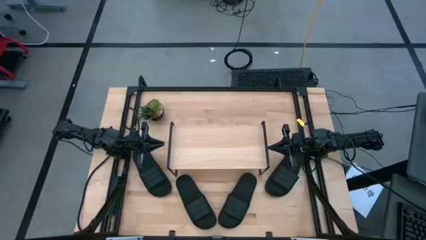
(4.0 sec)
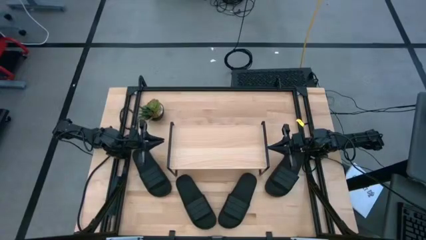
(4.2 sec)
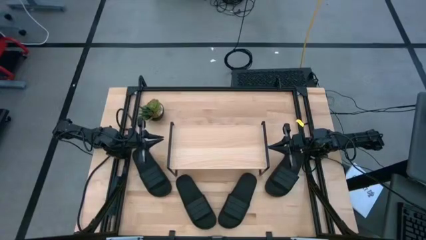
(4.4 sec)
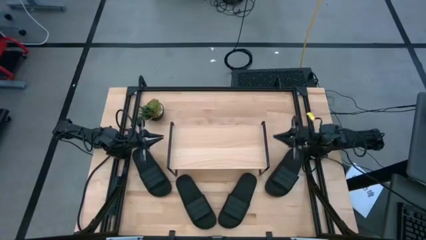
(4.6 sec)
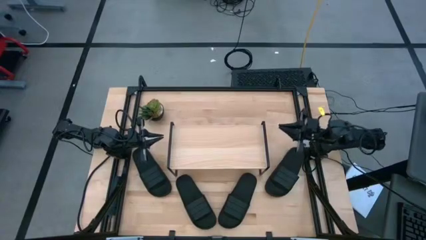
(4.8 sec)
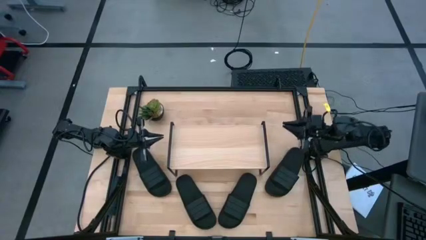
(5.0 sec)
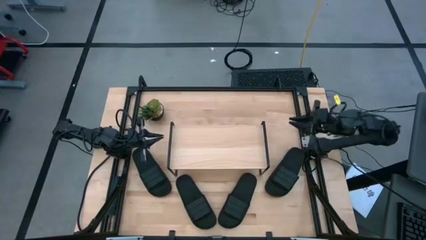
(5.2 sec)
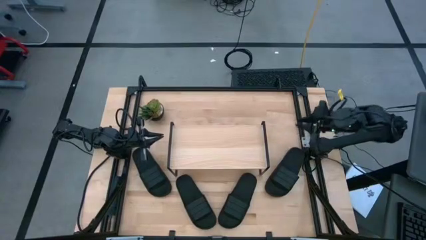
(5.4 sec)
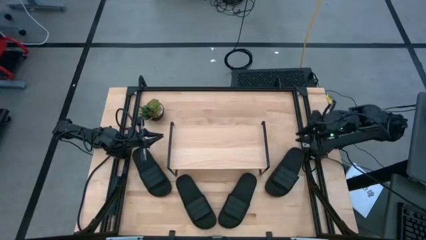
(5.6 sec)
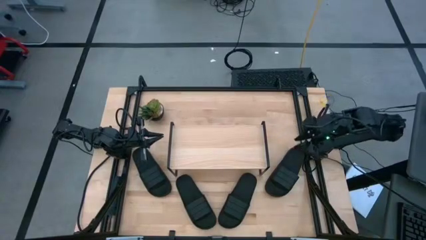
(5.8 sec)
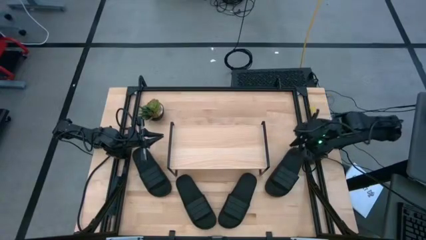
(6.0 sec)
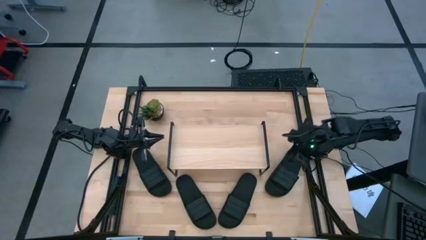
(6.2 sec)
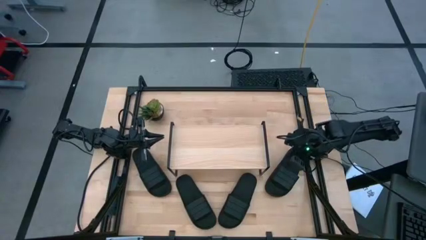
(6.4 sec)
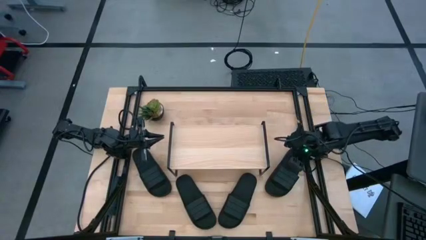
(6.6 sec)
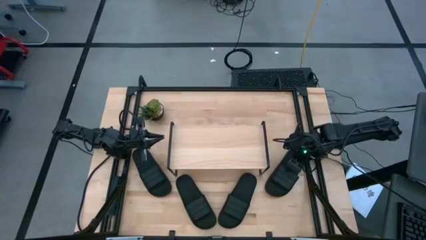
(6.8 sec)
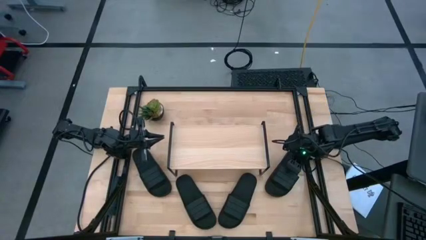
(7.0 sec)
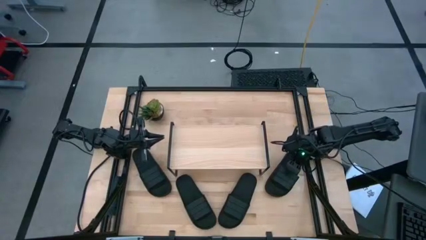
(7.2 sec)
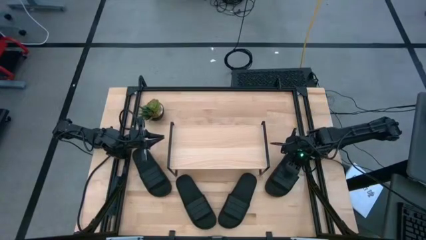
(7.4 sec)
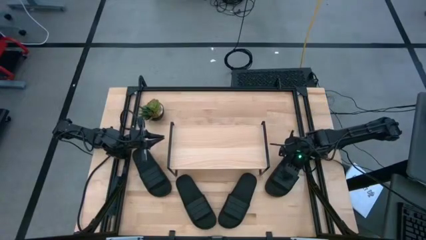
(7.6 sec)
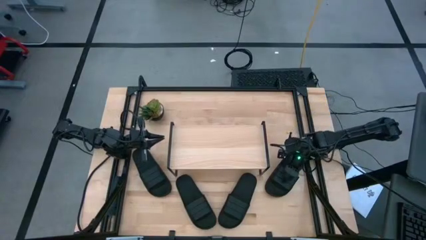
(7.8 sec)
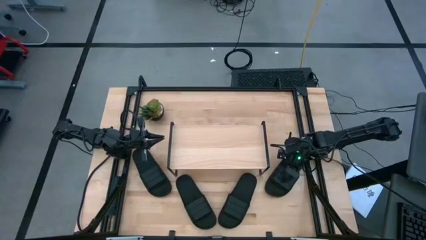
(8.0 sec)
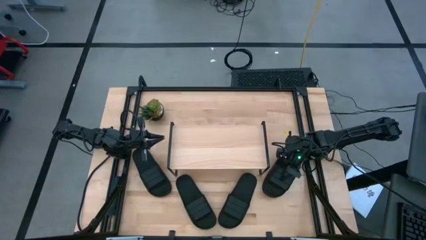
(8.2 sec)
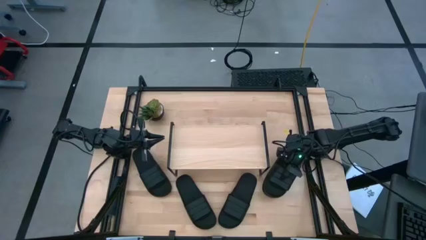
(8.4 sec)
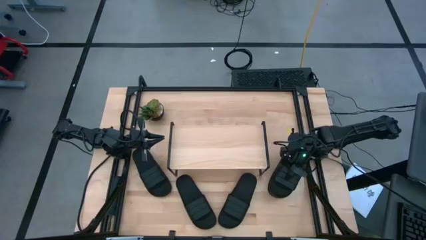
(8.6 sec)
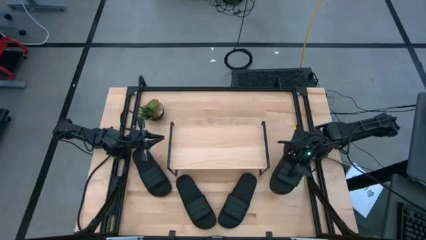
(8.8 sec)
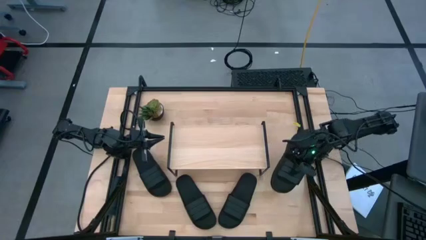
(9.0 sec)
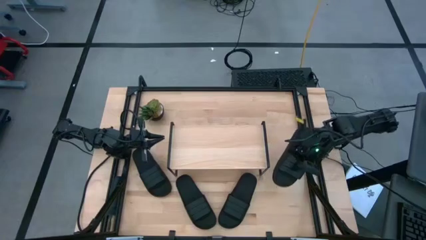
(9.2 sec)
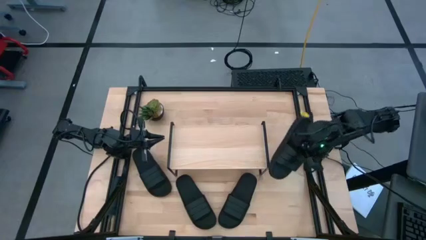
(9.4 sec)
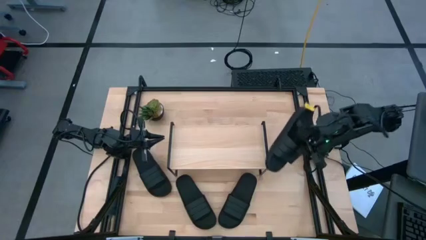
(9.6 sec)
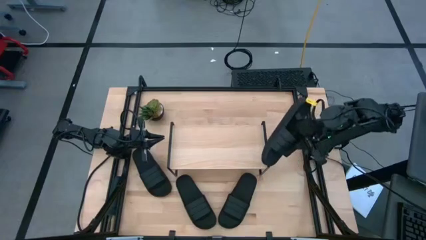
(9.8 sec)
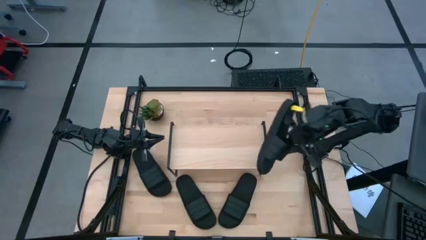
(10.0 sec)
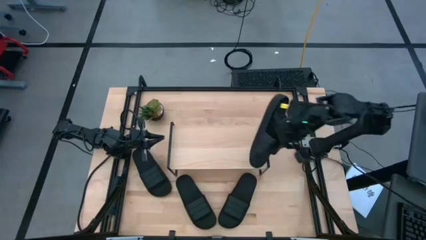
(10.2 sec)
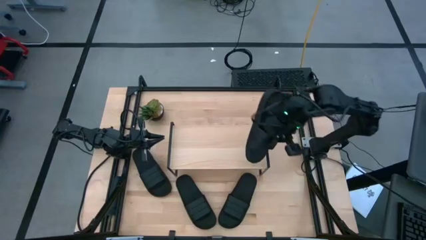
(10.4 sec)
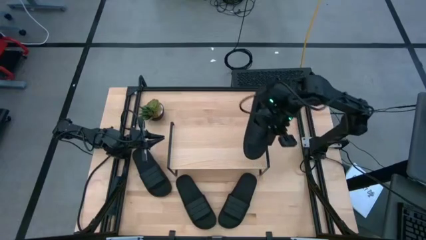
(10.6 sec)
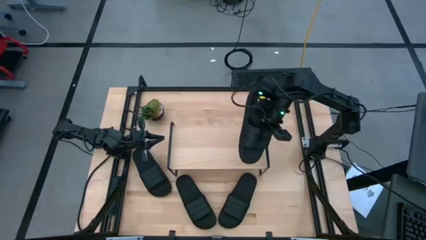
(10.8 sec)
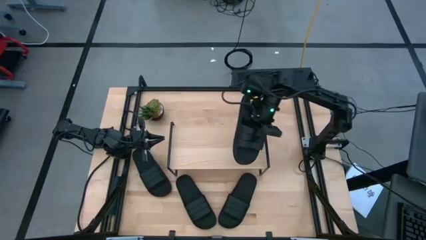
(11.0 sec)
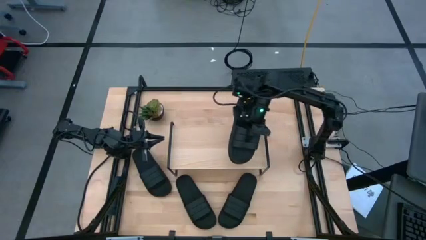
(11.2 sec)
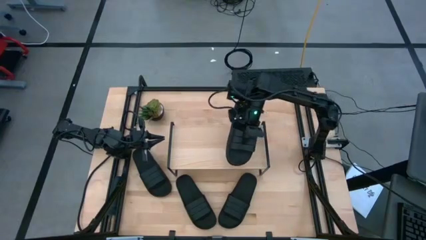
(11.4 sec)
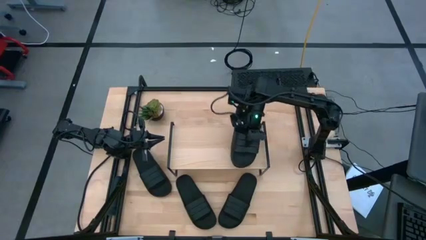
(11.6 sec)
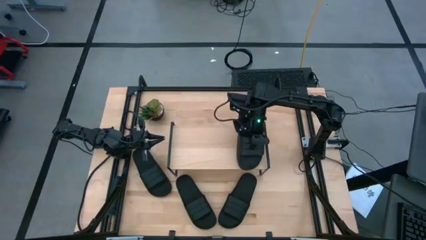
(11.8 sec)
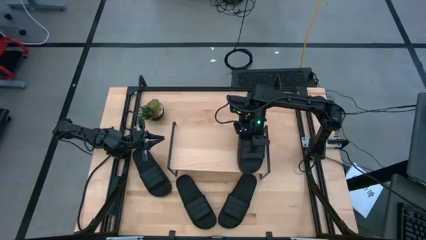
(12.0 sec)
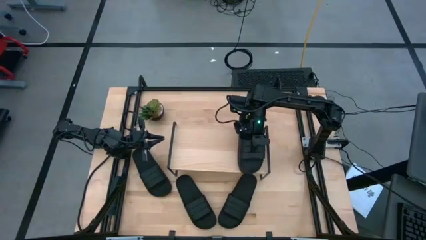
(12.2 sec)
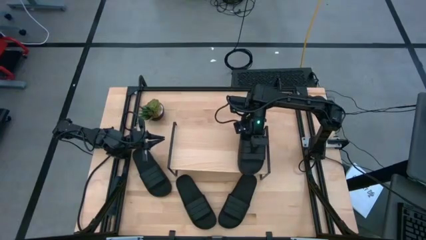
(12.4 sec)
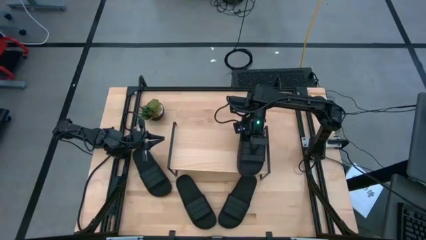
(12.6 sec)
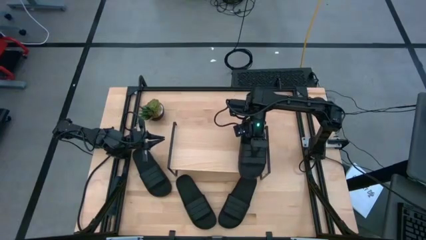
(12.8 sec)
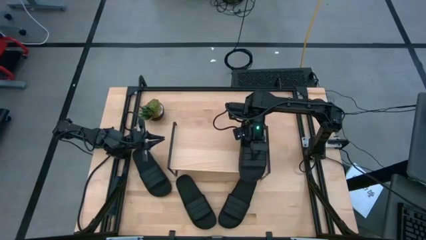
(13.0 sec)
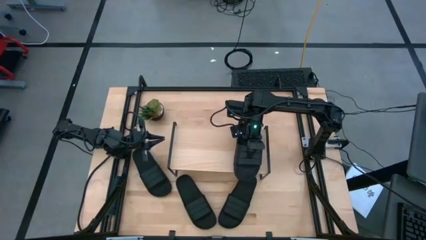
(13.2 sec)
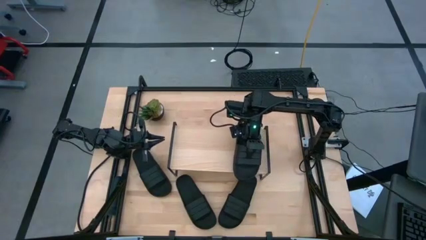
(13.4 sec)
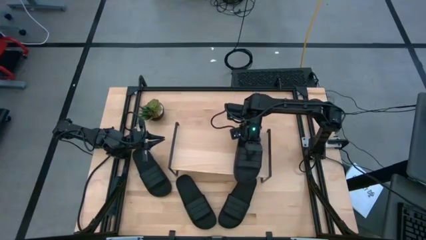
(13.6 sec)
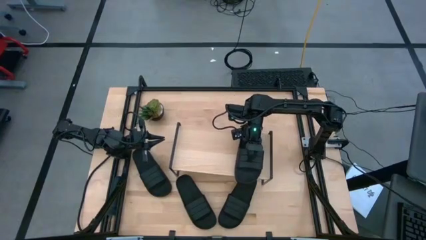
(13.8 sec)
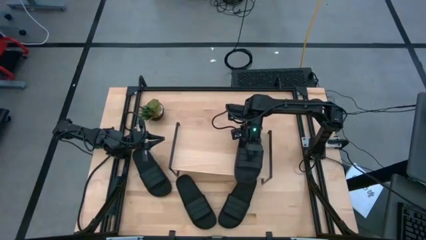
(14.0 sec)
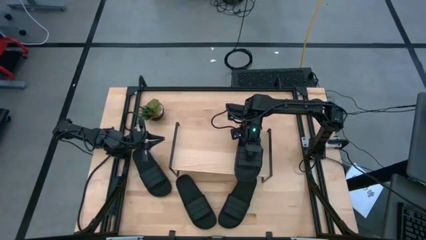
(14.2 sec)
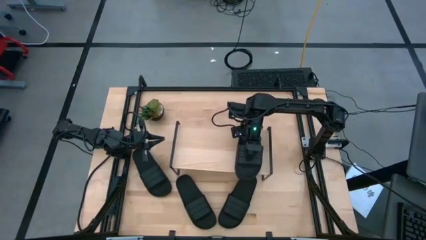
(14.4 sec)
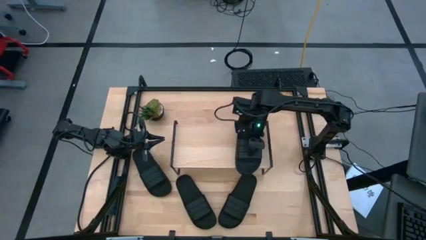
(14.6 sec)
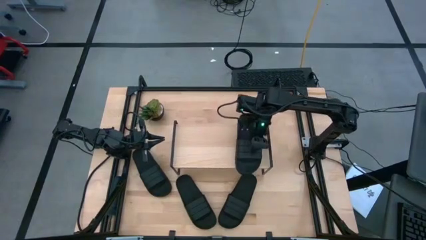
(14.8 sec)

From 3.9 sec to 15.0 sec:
Task: Pick and place slides into the shelf
Put the black slide on the shelf

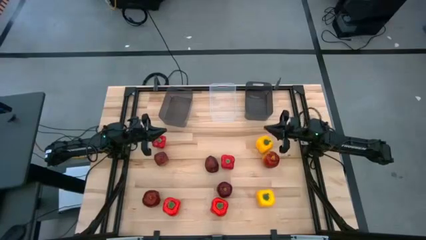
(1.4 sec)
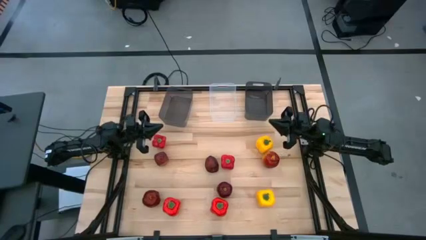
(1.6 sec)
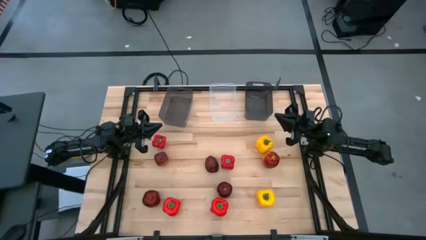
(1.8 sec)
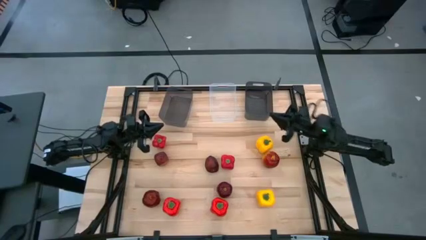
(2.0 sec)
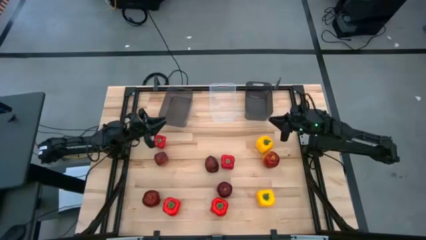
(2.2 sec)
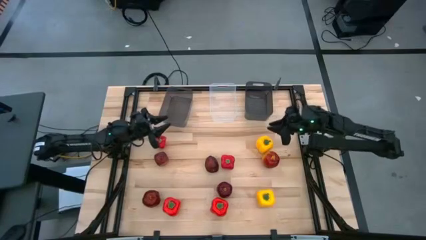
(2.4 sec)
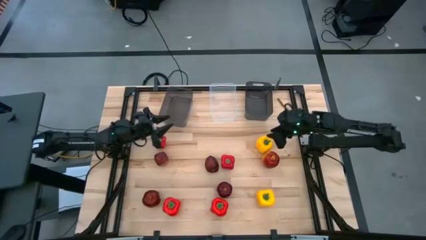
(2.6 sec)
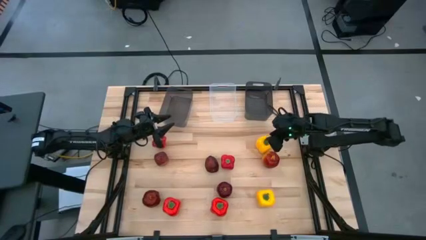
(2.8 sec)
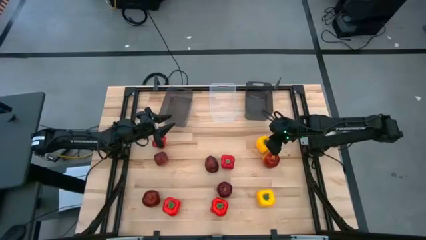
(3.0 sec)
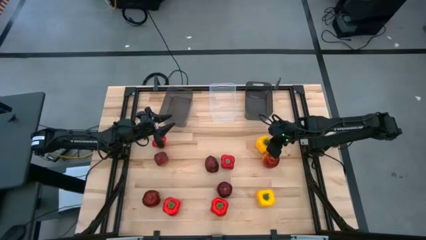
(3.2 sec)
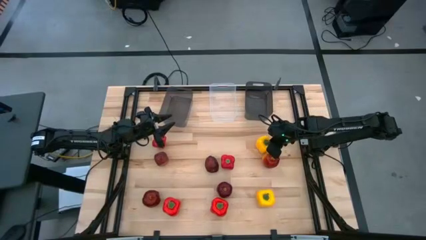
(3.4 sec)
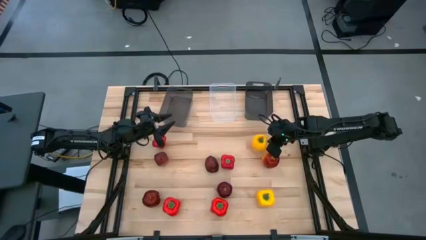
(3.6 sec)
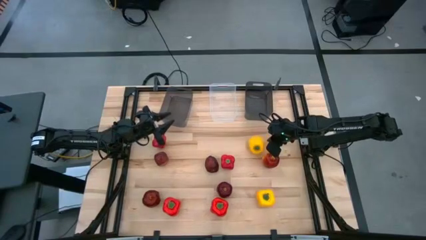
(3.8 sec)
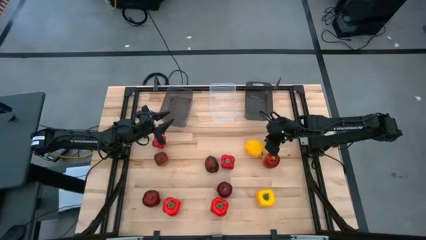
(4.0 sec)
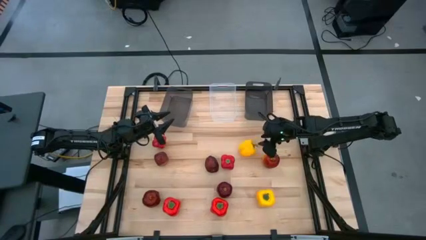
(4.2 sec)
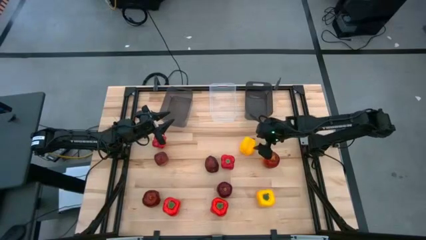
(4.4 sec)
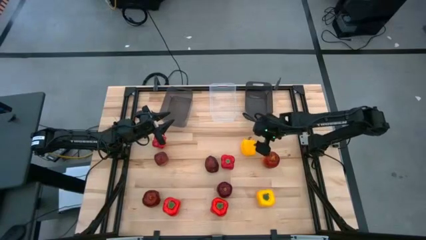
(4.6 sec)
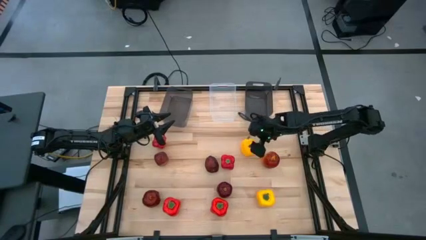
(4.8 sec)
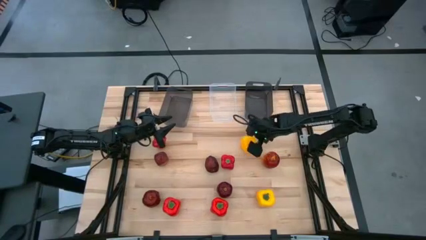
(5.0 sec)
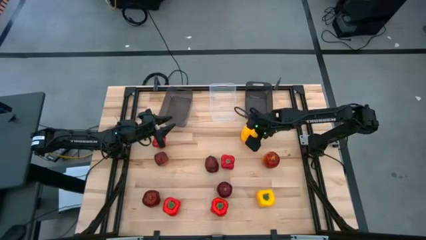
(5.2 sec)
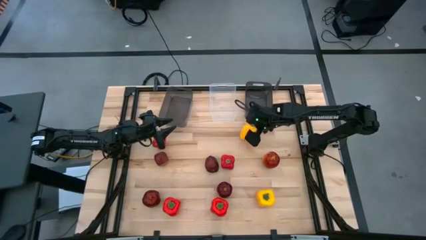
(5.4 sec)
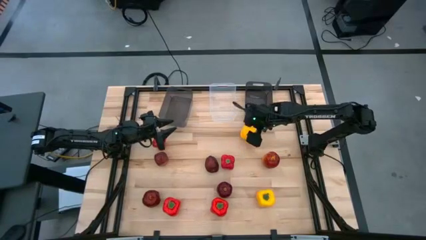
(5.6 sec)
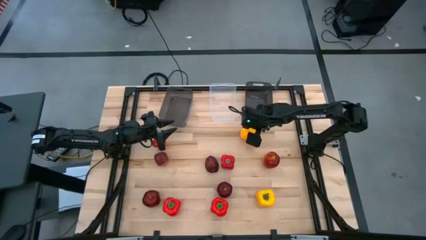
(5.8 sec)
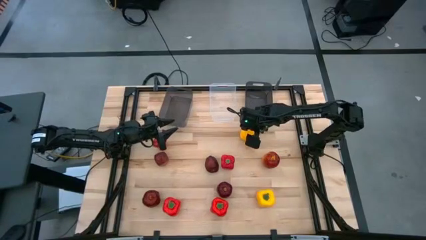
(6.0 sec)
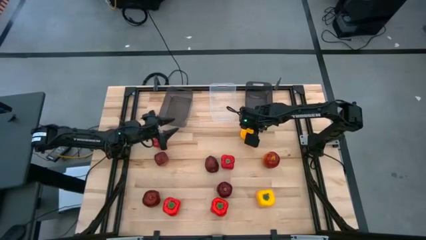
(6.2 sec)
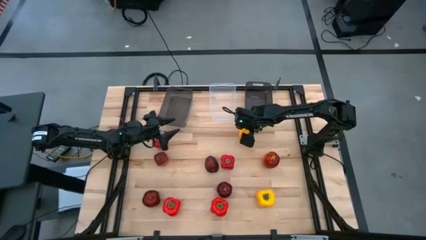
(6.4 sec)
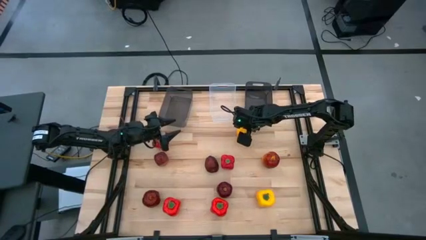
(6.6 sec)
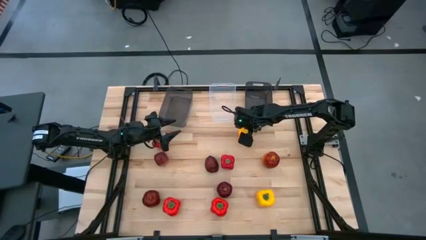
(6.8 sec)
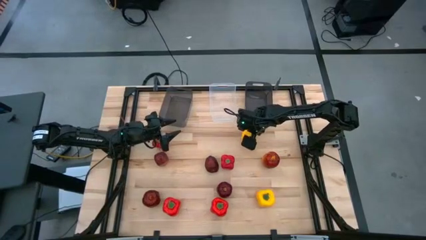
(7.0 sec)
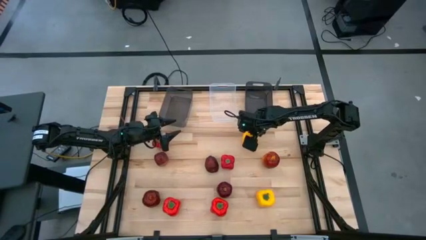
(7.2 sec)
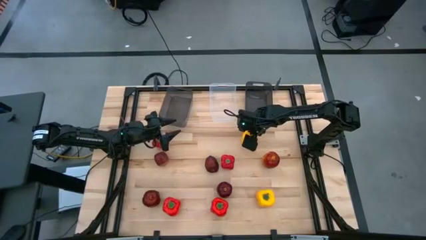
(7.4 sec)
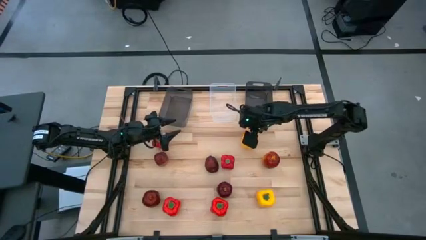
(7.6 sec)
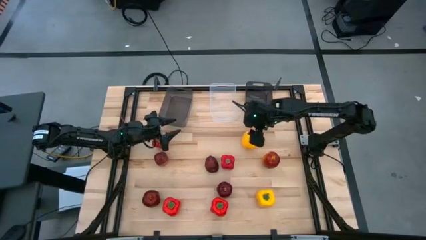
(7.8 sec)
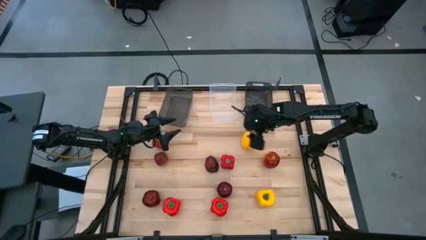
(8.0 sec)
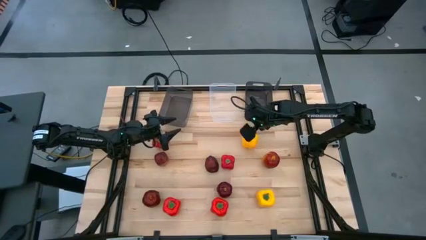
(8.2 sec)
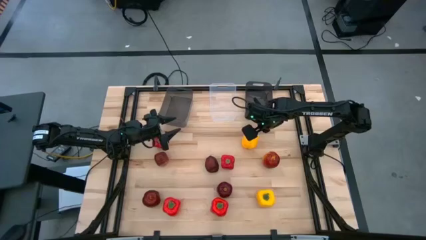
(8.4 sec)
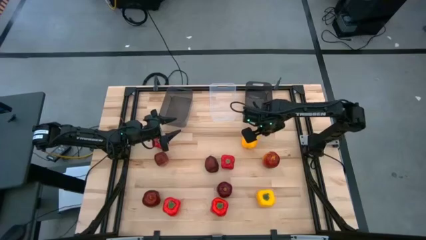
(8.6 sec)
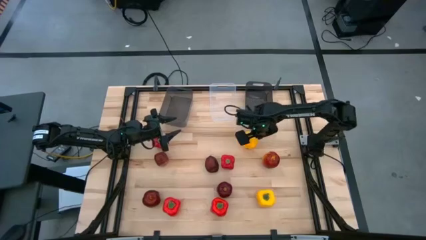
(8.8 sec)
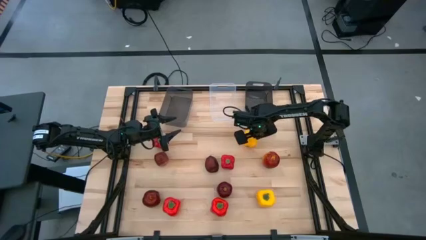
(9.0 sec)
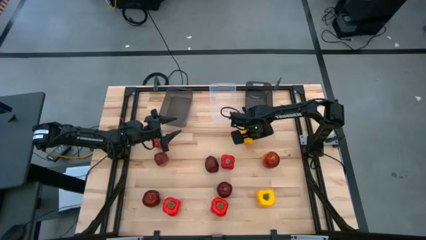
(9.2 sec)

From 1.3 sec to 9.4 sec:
Task: Sort produce into baskets
Put the top yellow bell pepper into the right black bin
